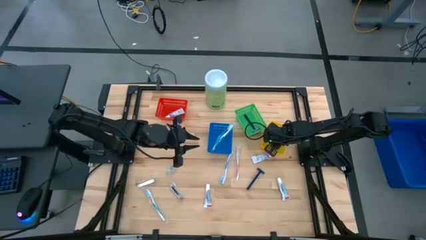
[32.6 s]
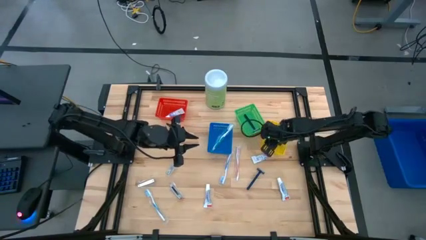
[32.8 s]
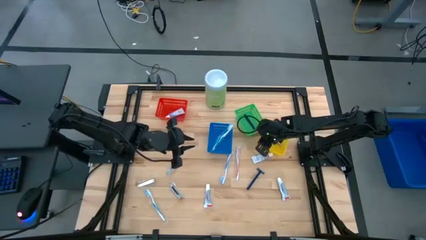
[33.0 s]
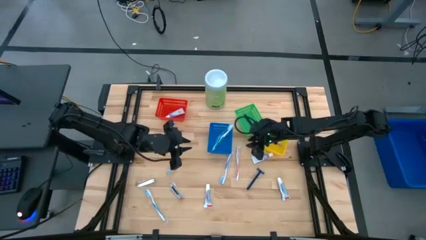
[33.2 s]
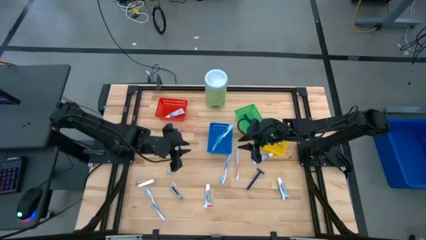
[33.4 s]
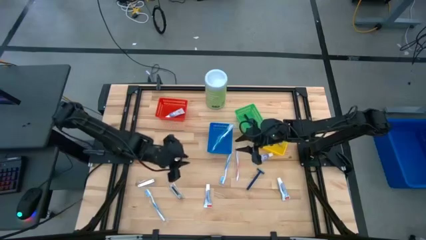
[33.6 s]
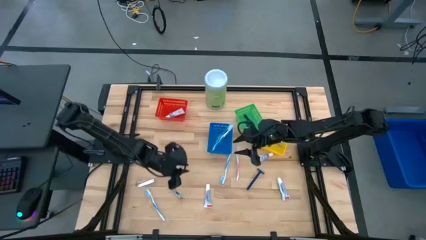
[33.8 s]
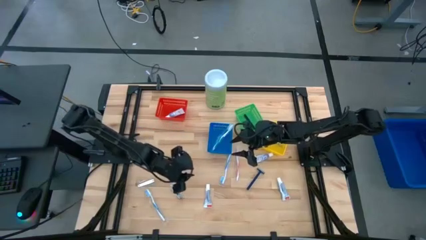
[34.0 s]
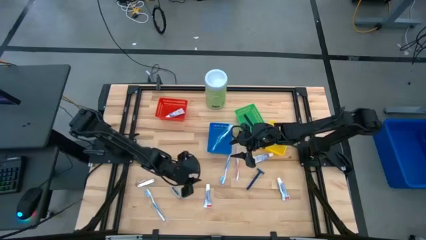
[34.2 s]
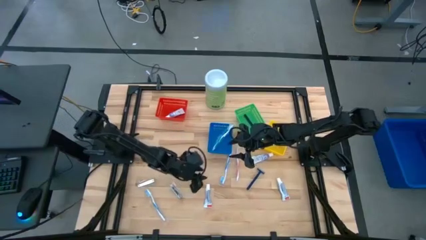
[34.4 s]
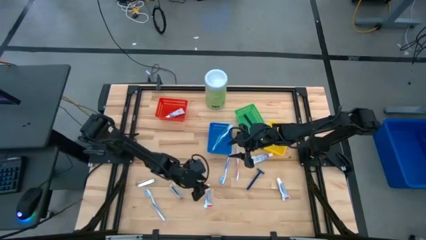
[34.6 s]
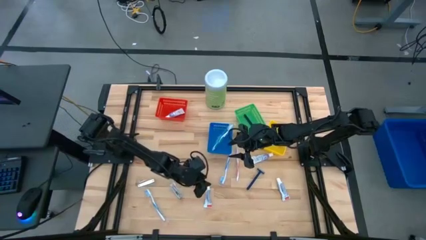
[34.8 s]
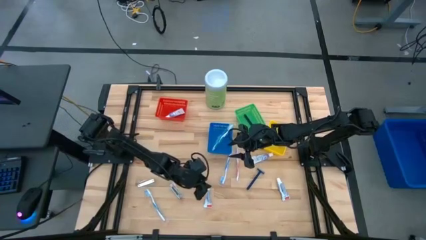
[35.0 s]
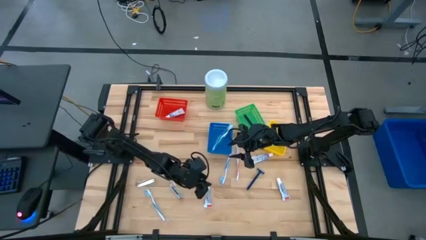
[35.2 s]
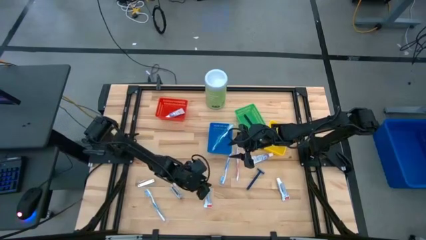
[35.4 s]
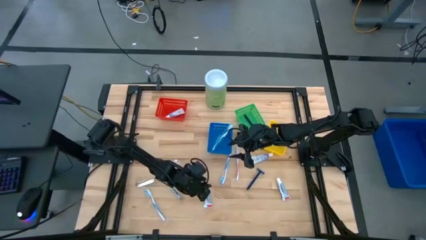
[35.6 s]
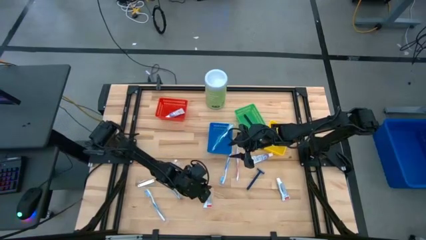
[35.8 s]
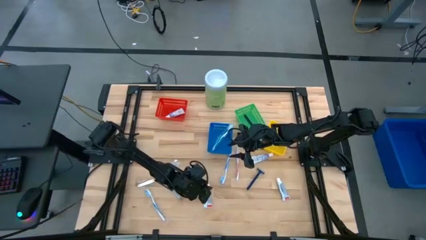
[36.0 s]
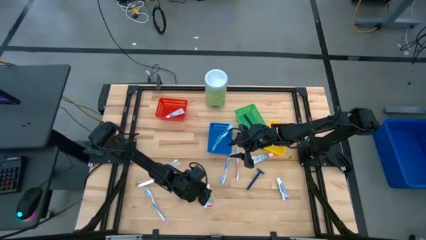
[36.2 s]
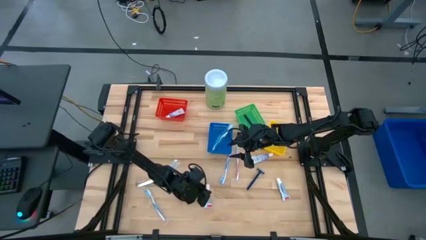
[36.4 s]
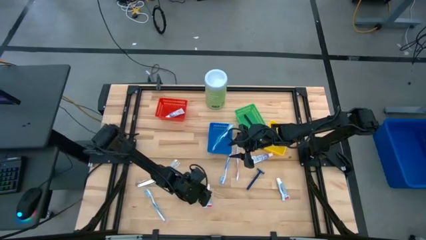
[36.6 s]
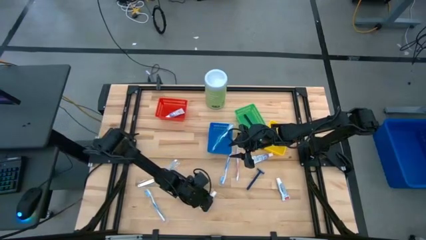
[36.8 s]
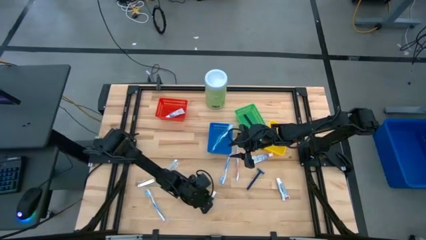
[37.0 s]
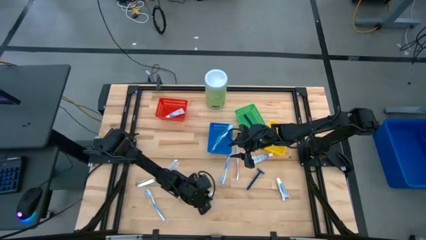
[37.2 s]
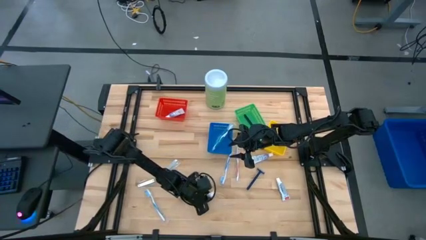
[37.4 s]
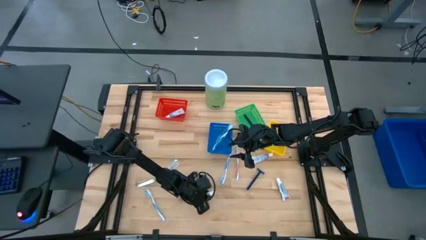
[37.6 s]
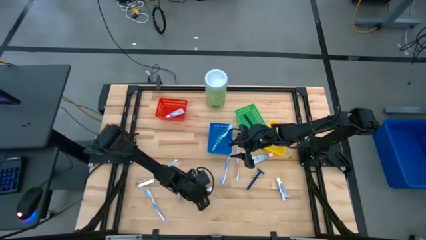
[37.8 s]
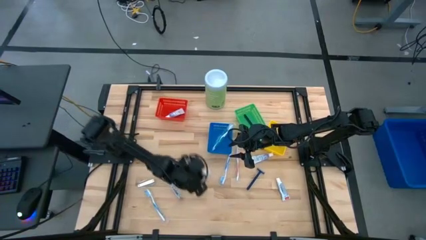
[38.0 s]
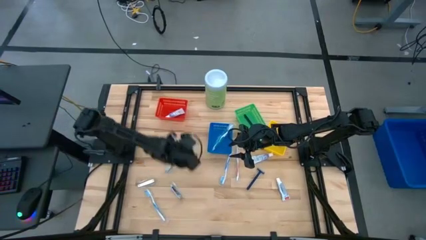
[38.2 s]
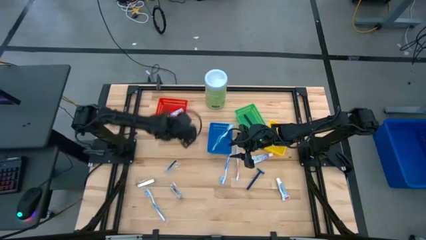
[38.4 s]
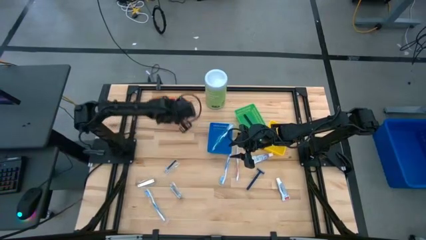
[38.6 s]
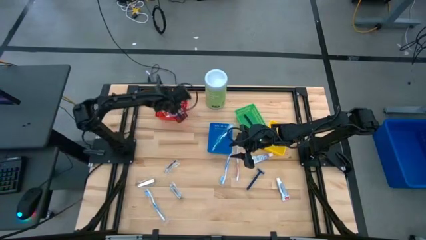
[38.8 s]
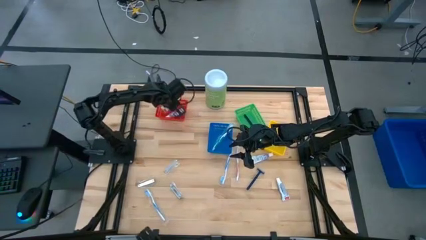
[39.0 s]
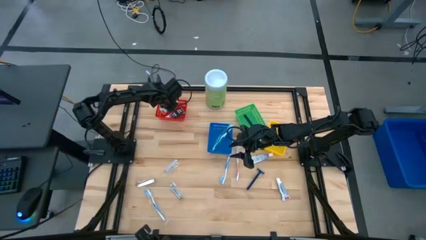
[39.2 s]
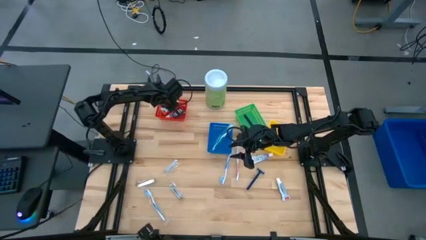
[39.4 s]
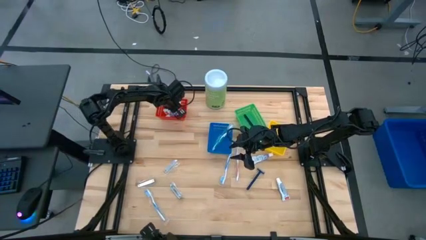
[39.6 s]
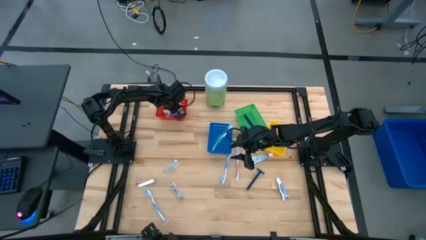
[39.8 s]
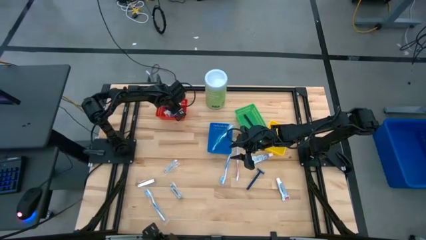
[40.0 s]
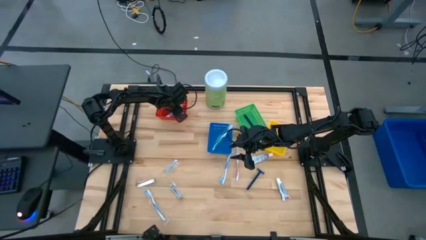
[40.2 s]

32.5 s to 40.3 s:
Task: Pick & Place Travel size toiletries
Put the white toothpaste into the red bin

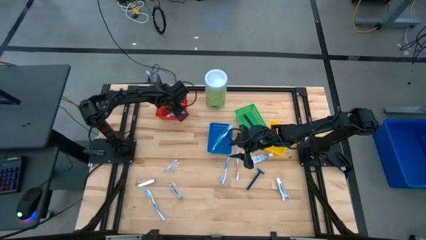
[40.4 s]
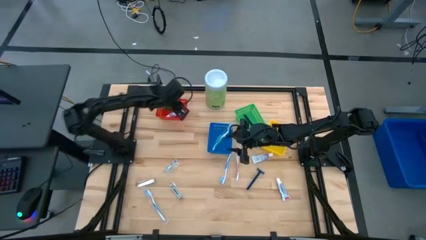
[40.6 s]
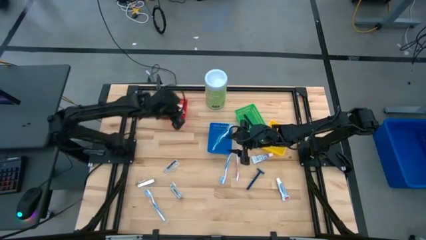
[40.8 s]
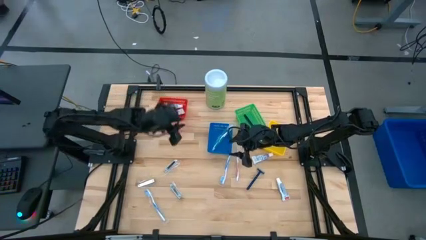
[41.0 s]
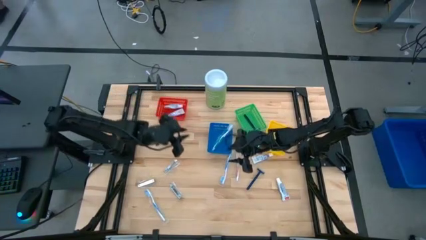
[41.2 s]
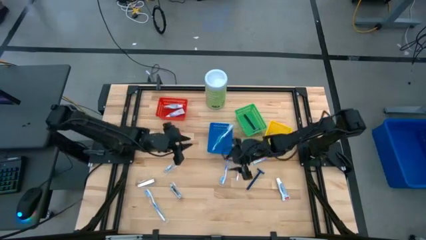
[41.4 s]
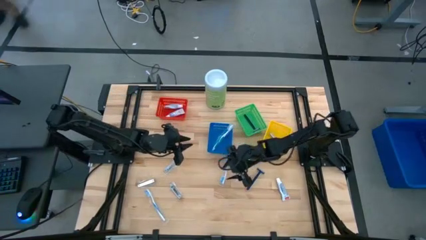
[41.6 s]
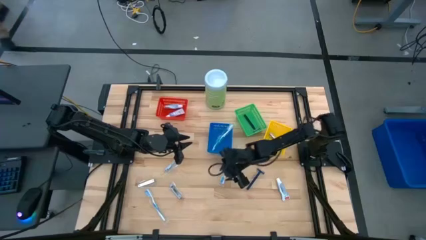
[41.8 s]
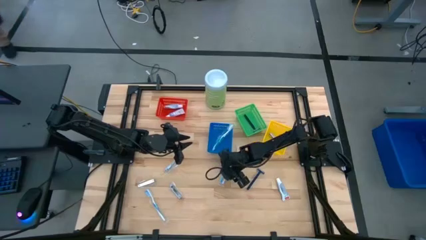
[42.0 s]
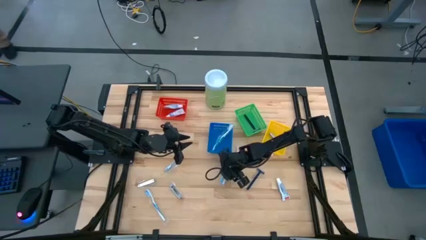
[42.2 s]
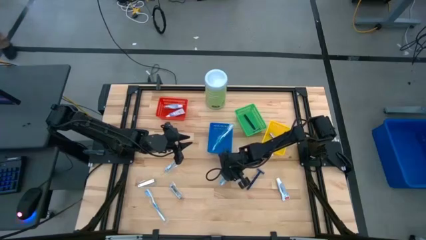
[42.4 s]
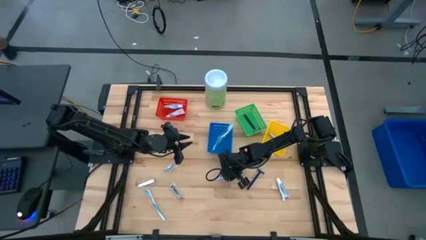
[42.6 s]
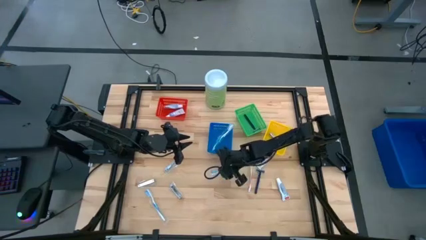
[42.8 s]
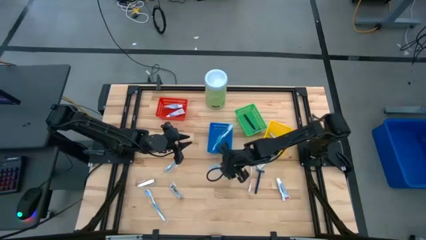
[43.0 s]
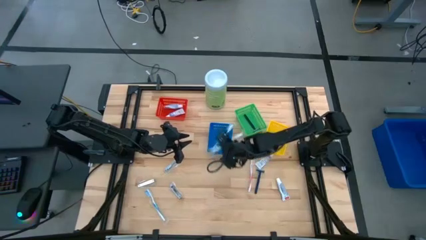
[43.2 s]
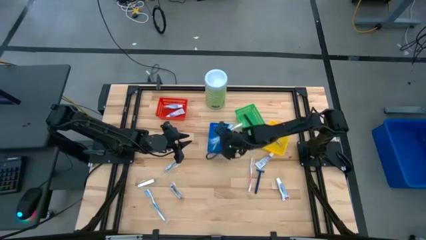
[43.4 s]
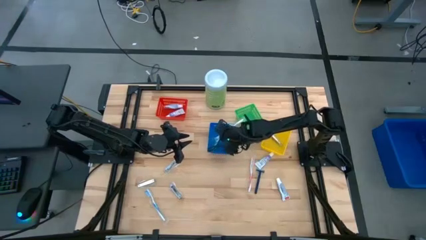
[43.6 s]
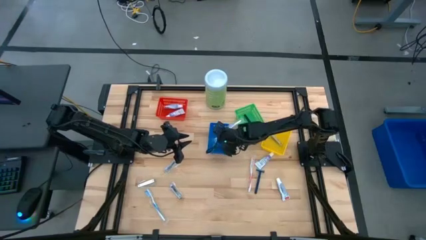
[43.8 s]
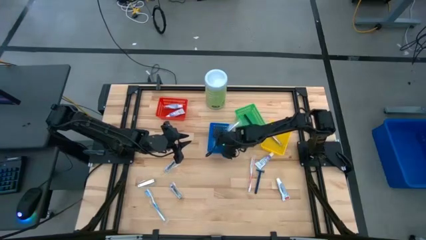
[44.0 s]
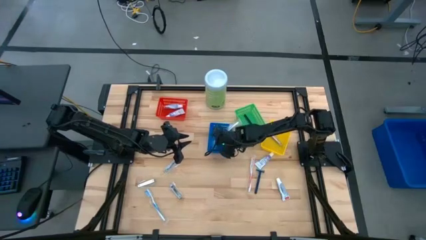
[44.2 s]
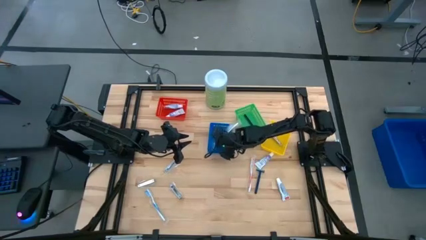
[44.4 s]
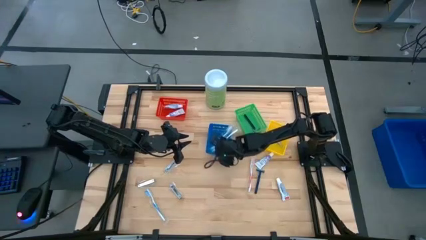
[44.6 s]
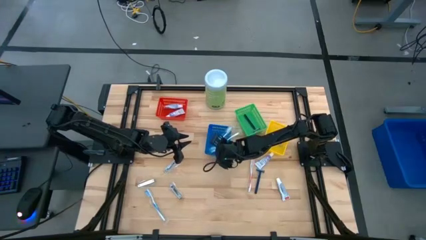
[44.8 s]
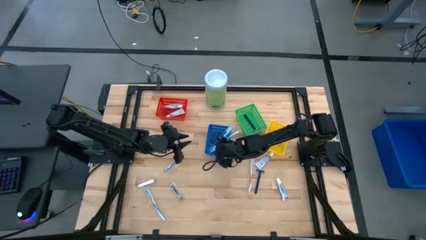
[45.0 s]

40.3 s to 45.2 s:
Put the blue toothbrush into the blue bin

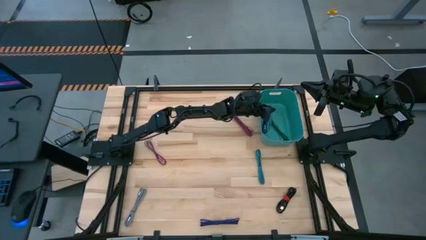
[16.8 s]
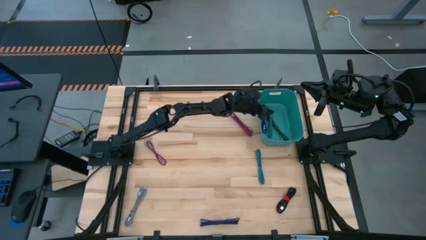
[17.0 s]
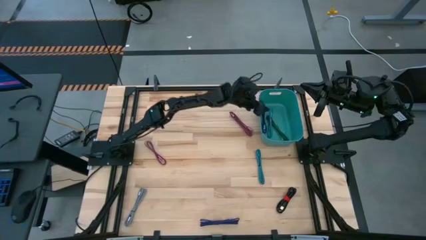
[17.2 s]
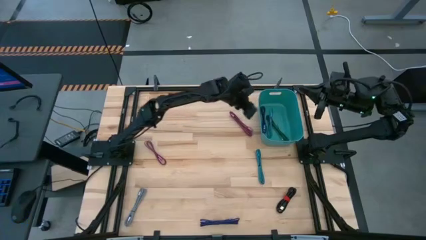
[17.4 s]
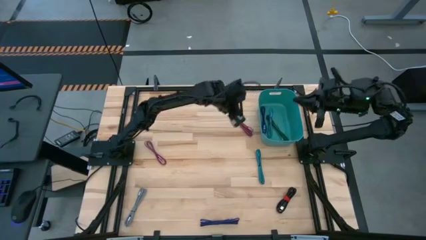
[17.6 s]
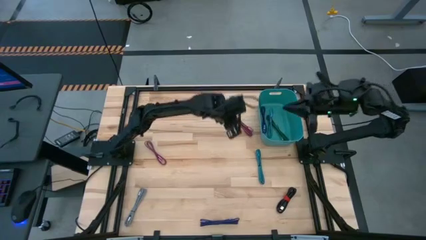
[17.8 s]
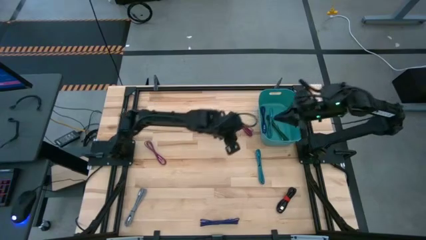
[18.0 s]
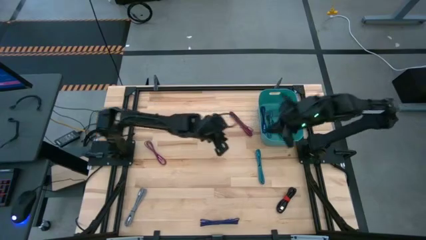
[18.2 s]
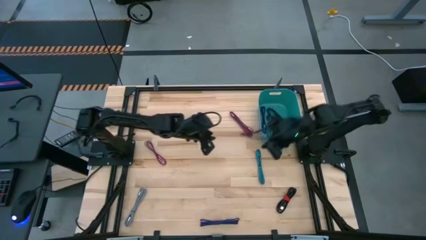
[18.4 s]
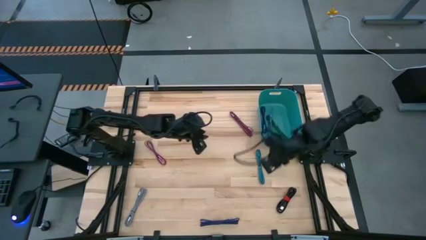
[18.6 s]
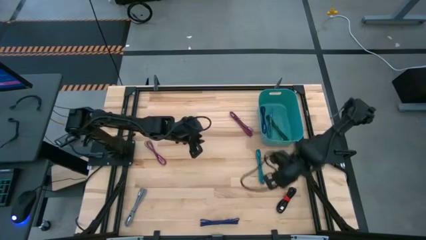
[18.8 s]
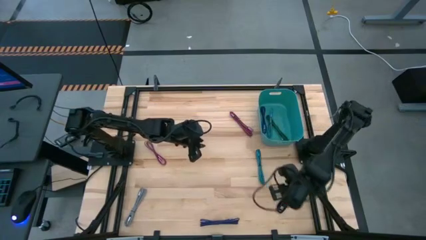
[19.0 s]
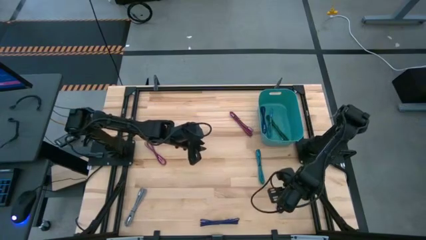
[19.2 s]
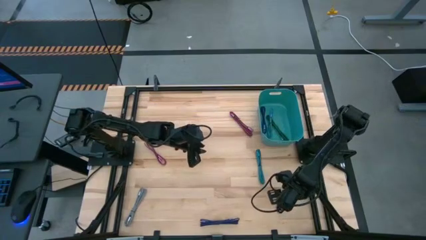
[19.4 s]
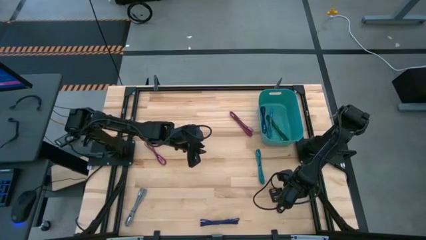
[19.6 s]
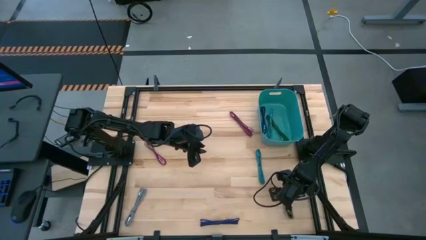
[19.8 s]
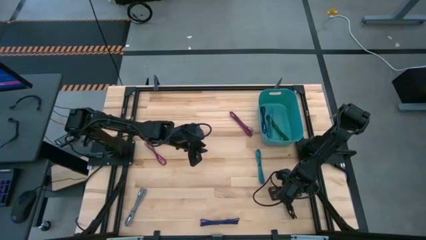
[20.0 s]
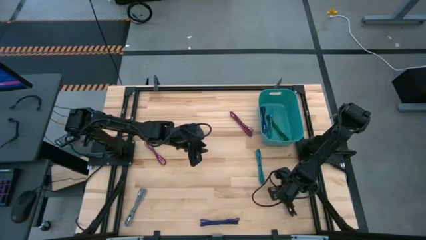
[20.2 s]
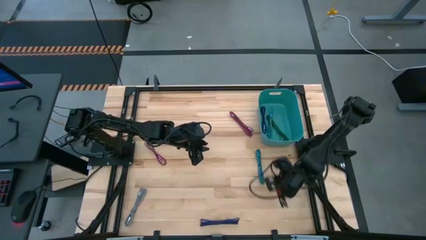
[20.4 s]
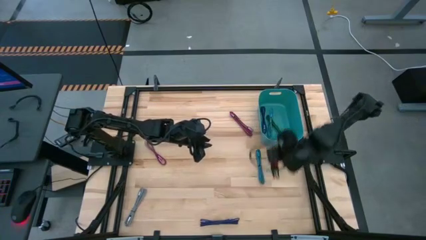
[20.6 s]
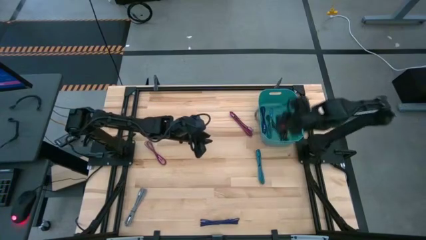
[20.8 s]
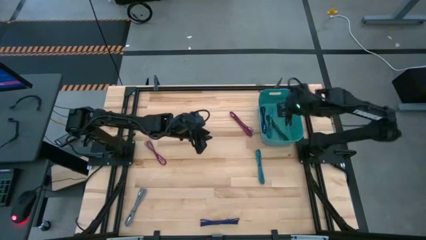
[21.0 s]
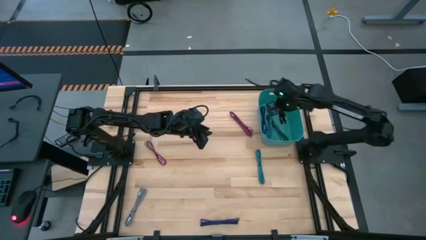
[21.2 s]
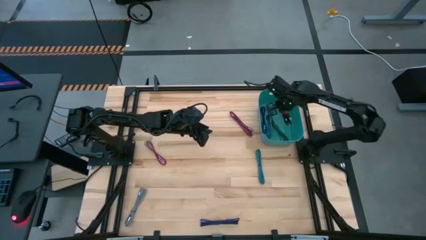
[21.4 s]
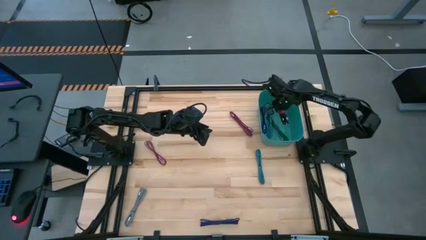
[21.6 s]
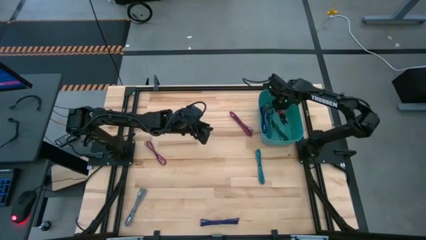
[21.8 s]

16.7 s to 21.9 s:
Task: Pick and place USB-C Cables
Put the black charger cable into the green bin
